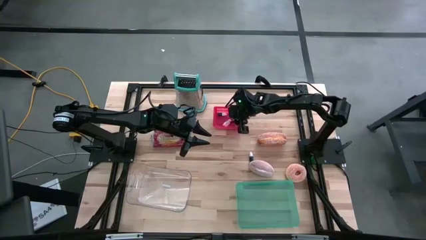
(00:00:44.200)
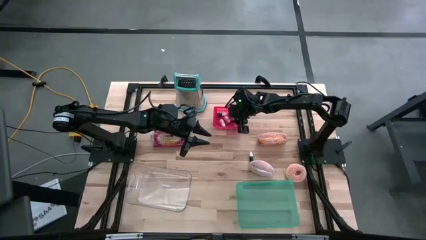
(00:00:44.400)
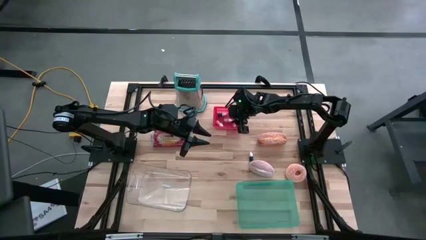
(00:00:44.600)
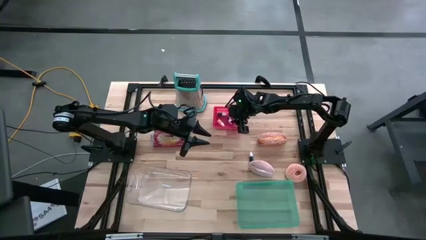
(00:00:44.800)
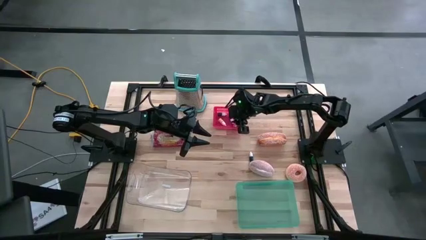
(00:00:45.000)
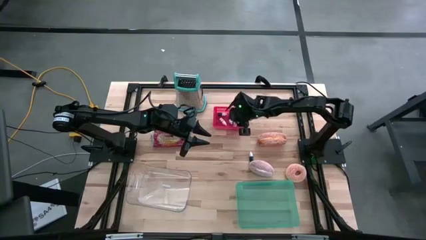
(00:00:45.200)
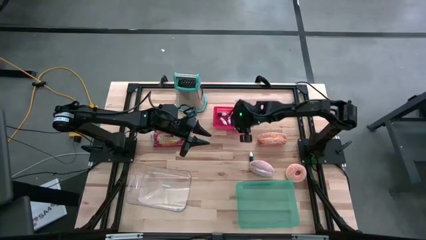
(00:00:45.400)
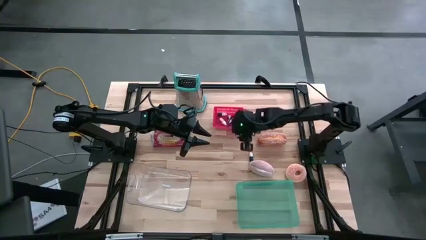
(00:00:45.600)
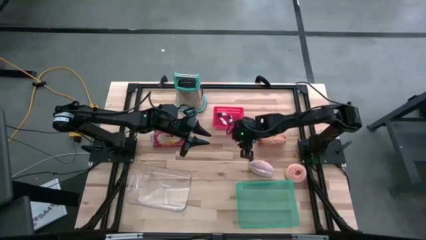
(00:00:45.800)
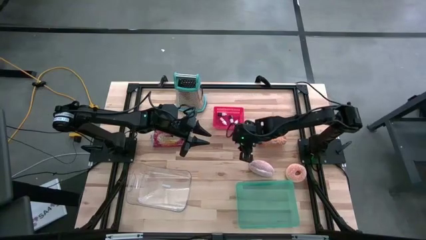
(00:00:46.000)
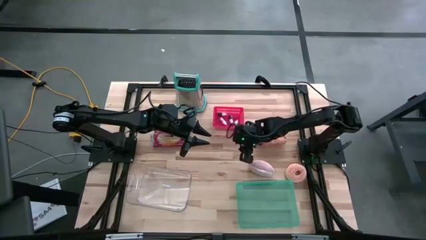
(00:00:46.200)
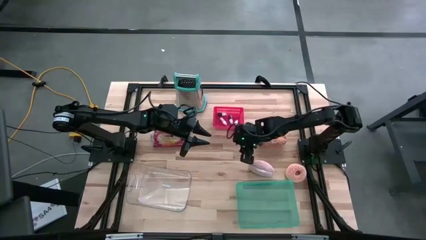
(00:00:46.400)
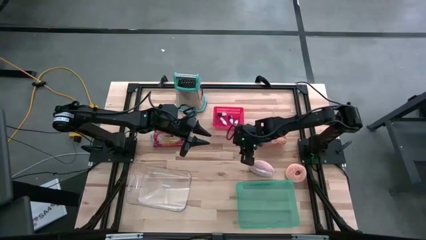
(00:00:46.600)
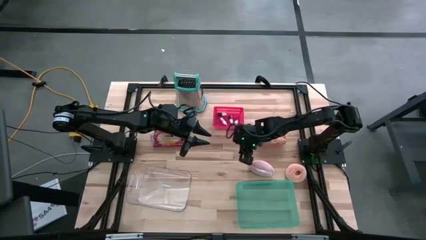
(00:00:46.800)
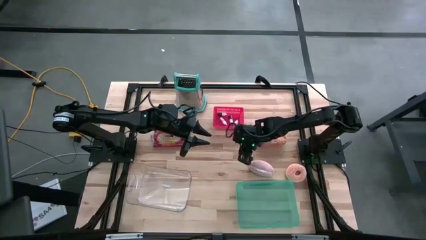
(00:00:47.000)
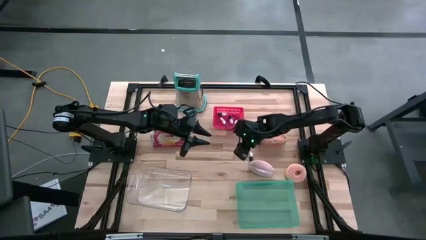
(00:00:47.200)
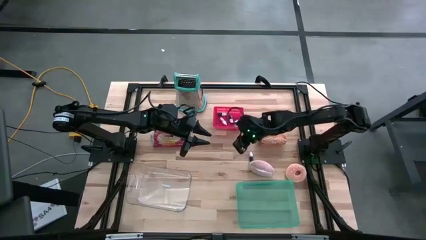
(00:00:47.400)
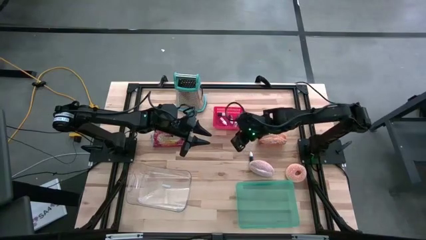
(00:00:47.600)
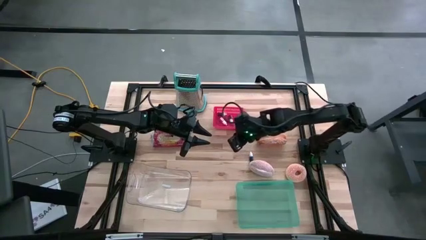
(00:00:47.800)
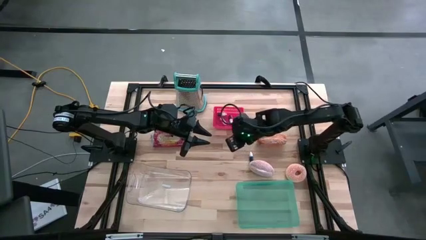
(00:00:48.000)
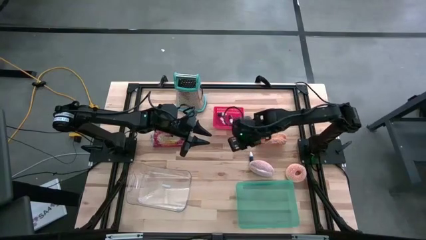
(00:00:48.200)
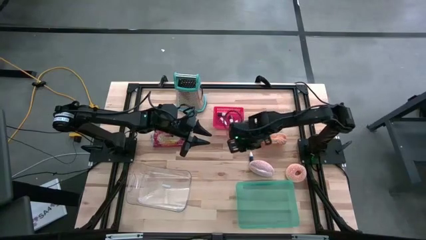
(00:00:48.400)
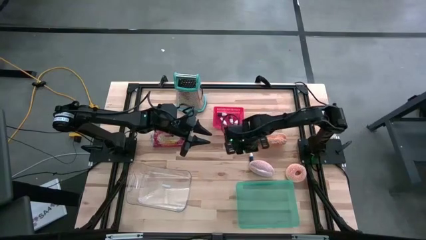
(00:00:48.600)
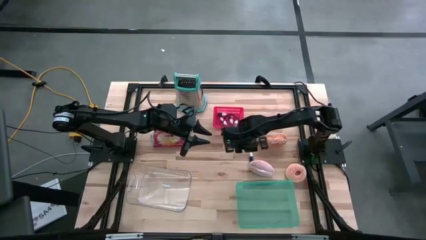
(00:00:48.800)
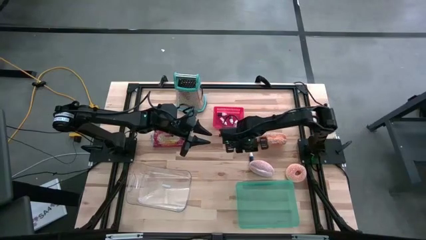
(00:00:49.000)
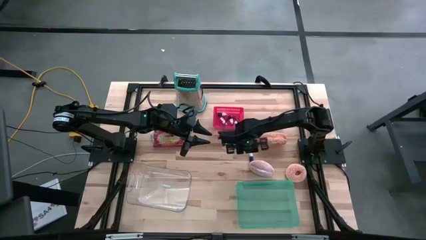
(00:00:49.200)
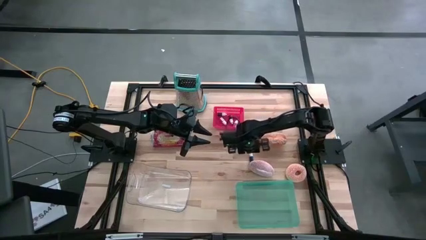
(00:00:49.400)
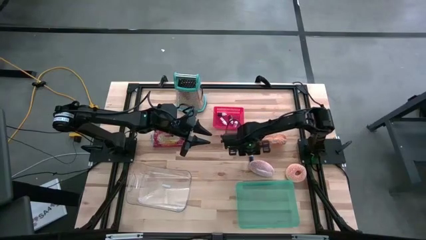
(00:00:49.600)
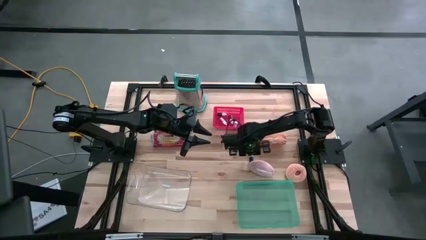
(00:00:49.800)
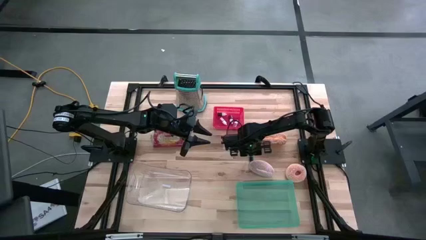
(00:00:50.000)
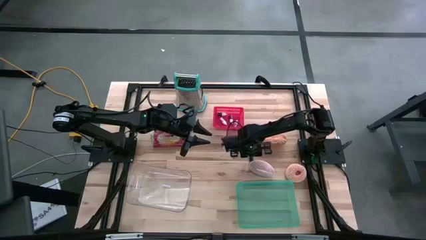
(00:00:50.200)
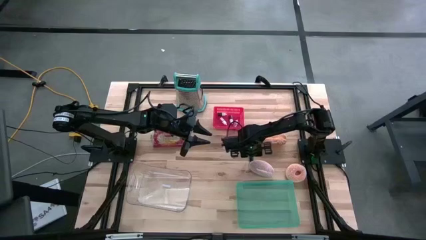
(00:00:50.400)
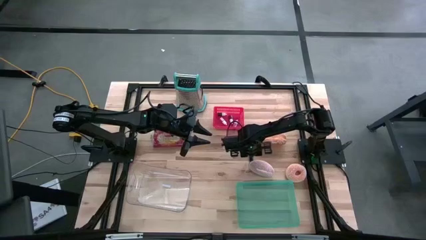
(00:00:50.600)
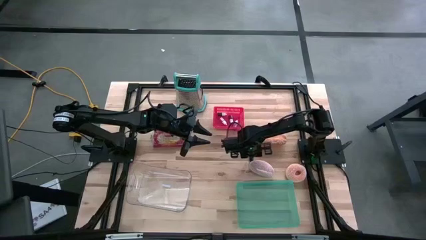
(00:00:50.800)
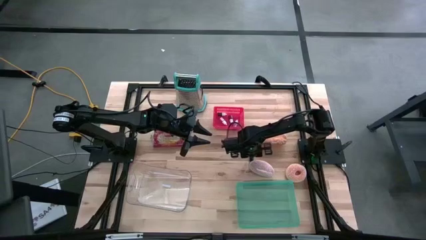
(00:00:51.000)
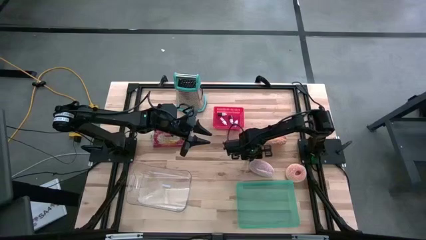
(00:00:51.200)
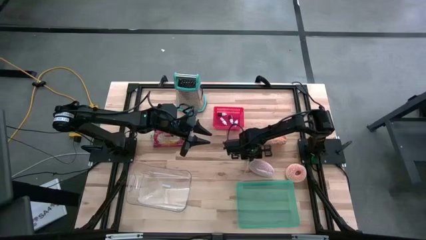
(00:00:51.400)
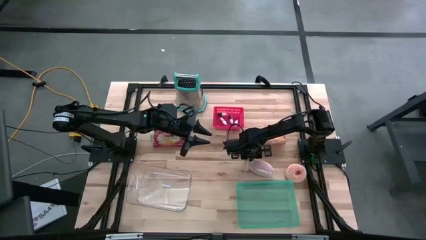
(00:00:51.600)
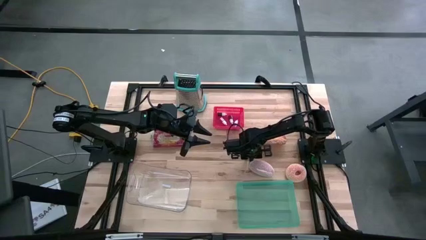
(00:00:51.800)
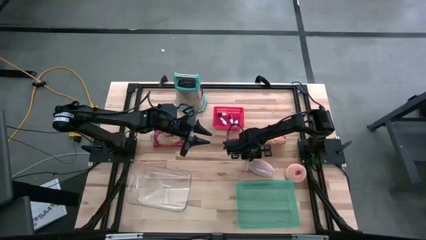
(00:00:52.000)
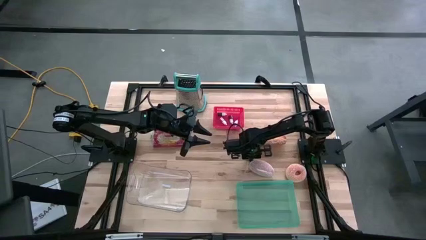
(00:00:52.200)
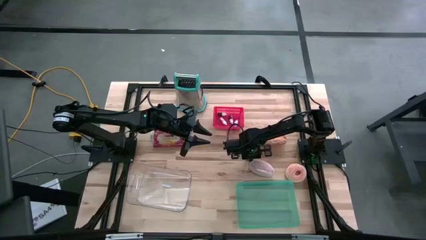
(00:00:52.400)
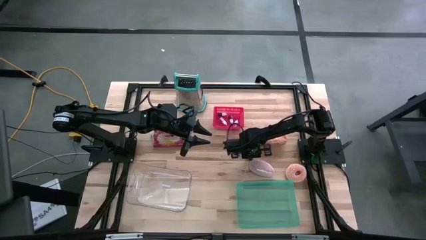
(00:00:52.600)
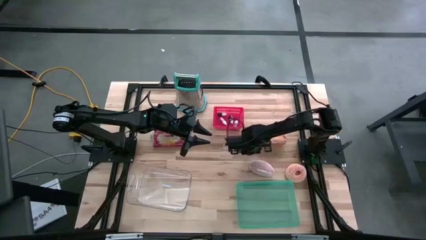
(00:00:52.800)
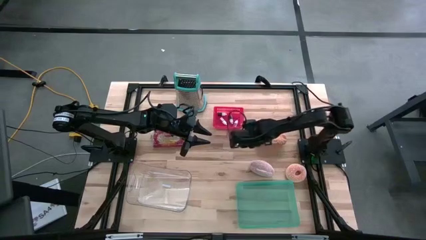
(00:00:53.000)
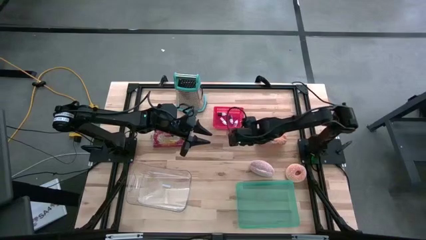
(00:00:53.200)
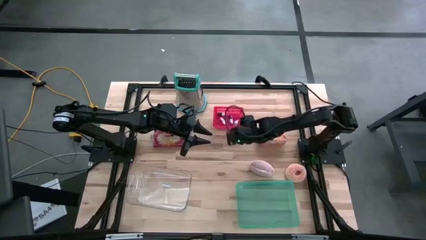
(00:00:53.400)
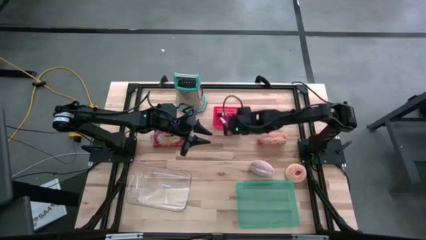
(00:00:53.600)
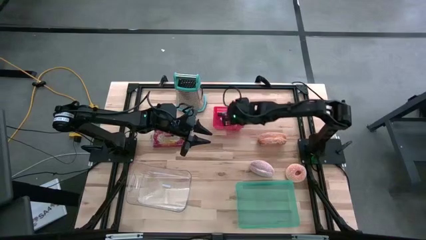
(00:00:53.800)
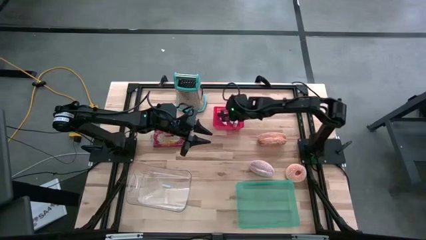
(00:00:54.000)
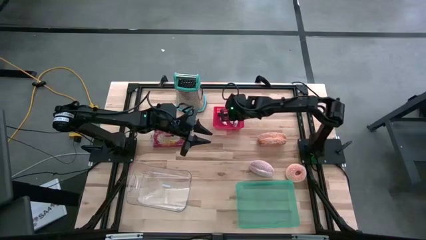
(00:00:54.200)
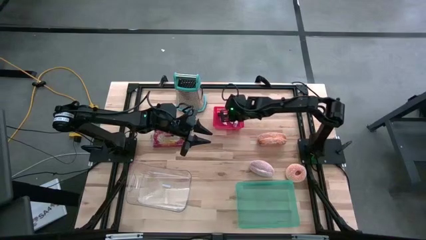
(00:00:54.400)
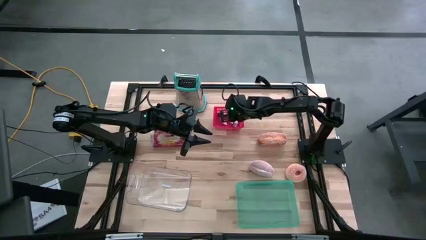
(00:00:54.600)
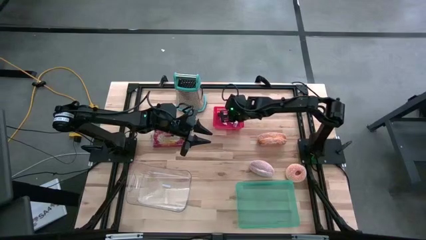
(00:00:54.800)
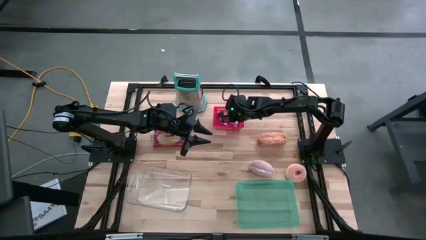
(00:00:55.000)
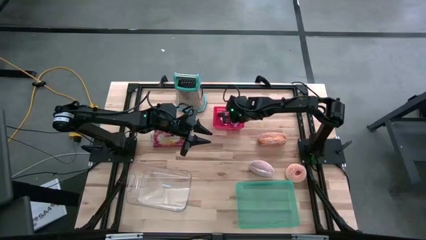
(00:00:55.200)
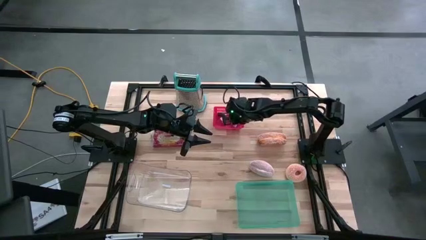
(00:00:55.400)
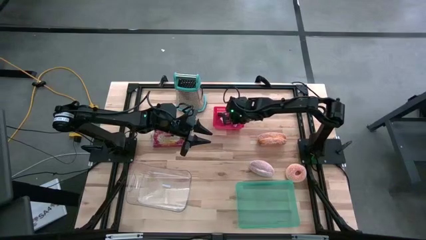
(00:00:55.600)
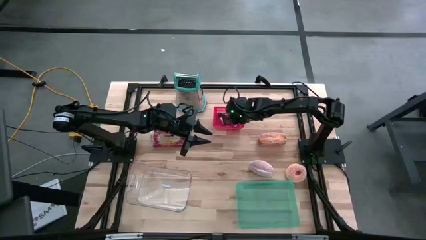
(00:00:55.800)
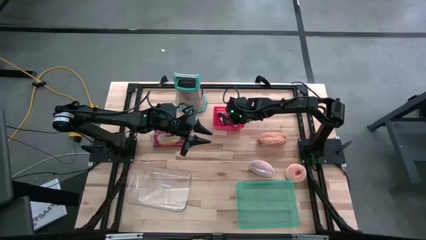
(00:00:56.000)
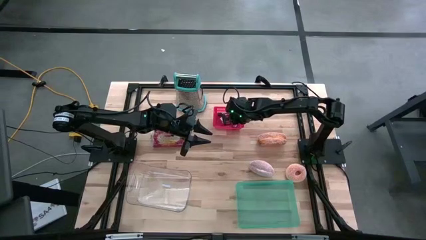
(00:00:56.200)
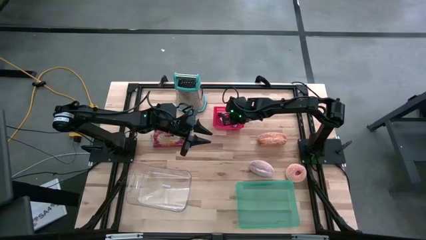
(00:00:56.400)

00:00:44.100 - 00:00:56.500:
Put the food coloring into the red bin
